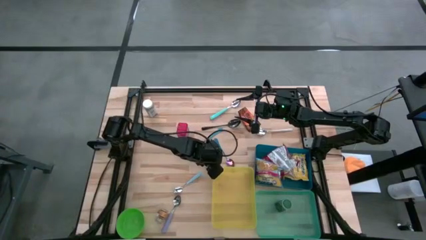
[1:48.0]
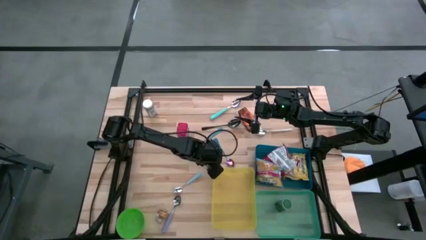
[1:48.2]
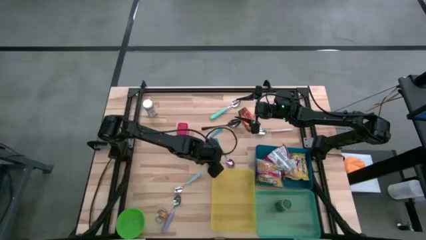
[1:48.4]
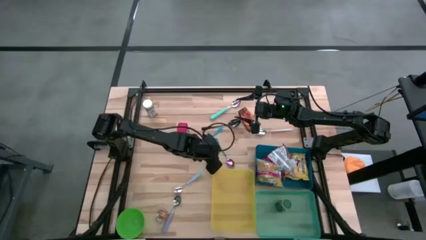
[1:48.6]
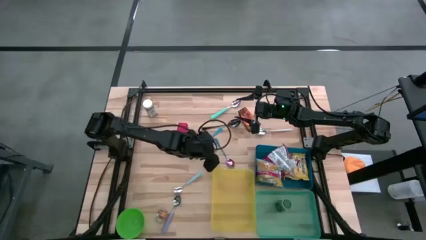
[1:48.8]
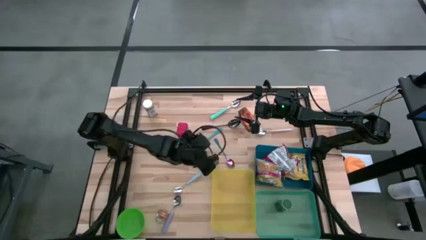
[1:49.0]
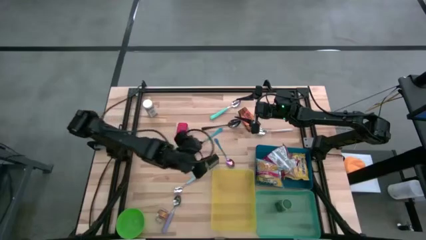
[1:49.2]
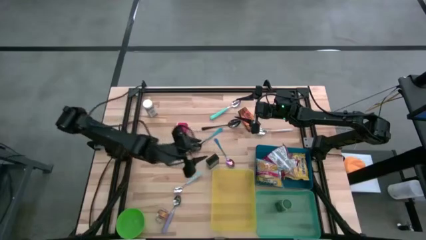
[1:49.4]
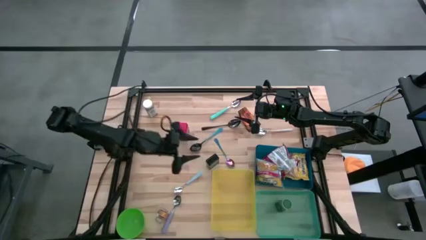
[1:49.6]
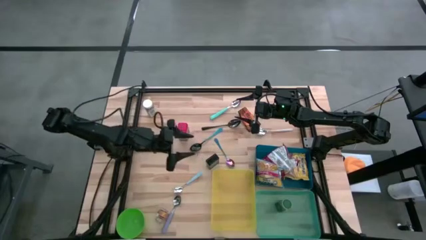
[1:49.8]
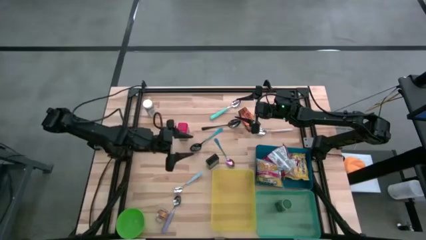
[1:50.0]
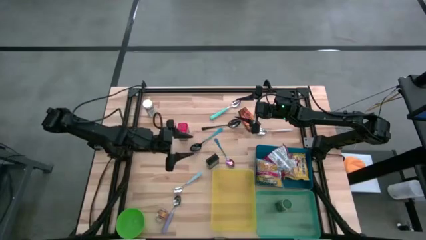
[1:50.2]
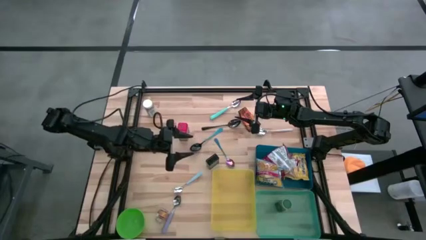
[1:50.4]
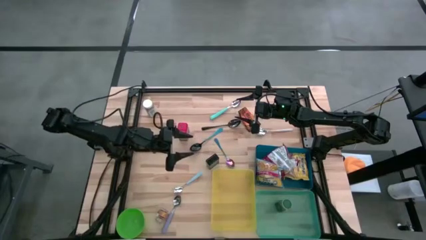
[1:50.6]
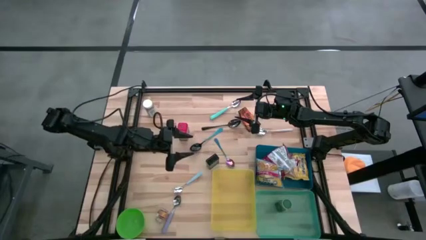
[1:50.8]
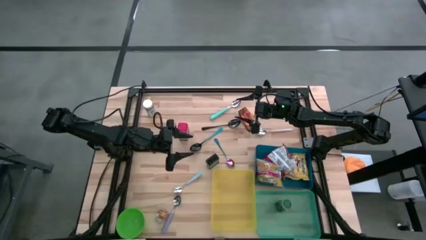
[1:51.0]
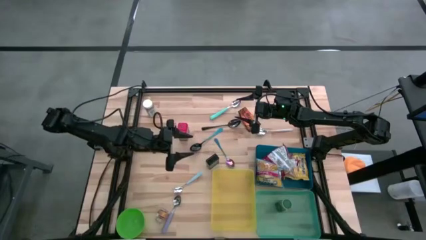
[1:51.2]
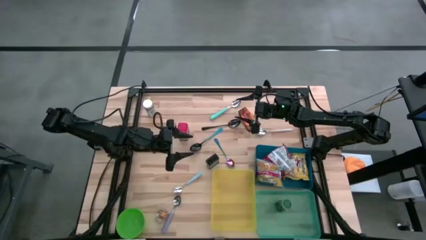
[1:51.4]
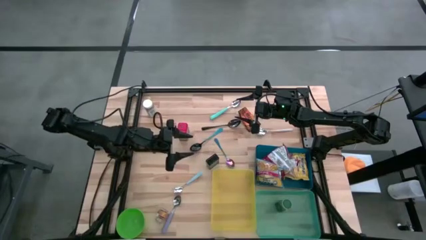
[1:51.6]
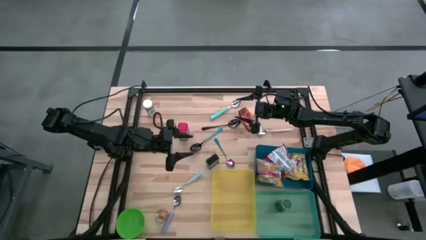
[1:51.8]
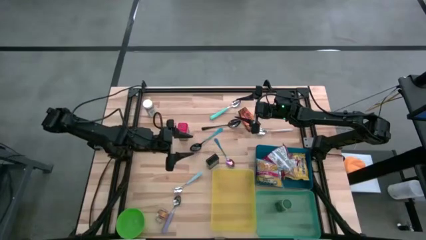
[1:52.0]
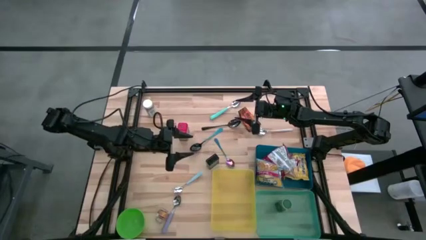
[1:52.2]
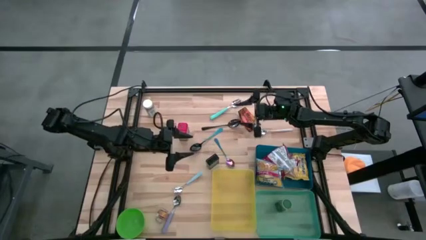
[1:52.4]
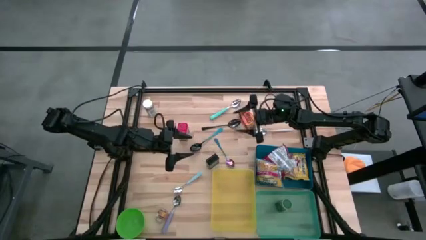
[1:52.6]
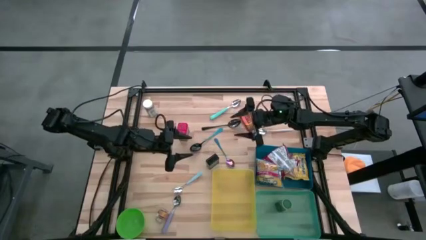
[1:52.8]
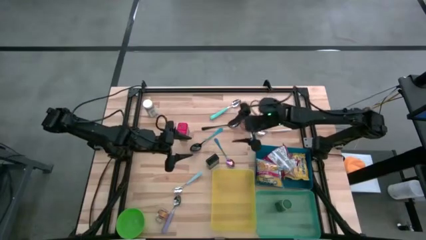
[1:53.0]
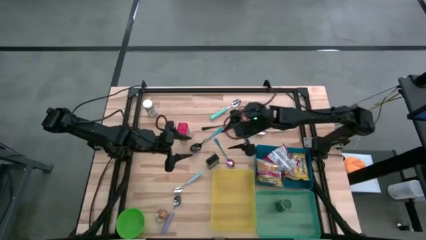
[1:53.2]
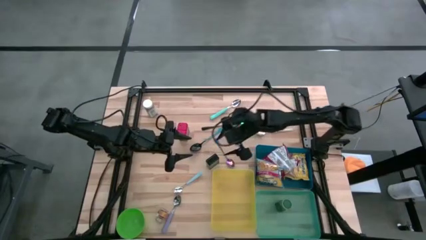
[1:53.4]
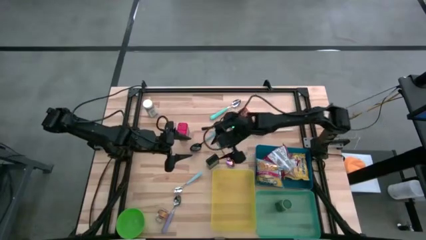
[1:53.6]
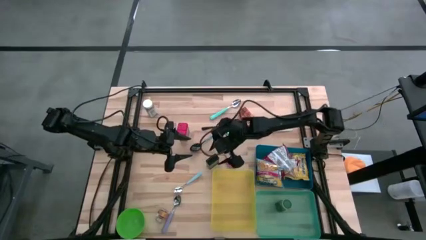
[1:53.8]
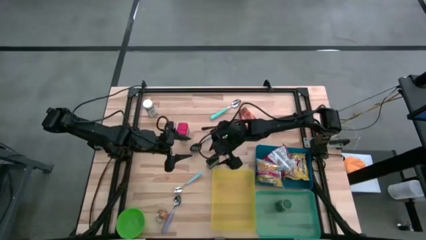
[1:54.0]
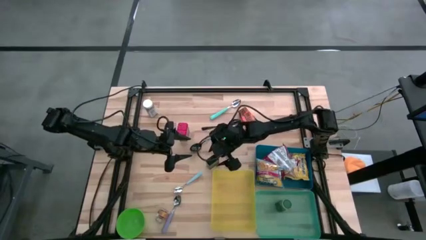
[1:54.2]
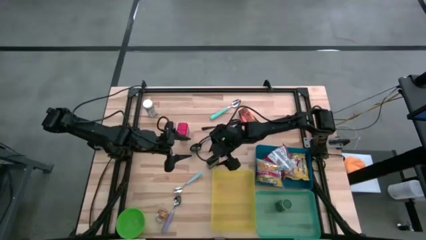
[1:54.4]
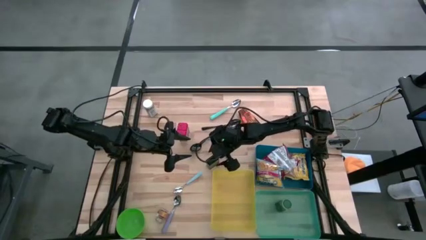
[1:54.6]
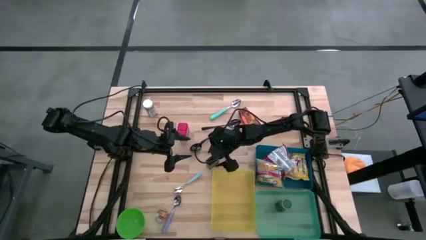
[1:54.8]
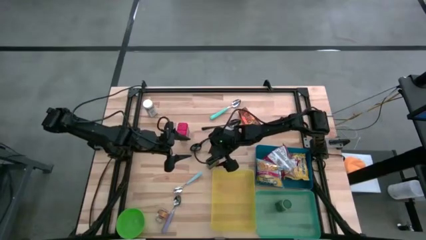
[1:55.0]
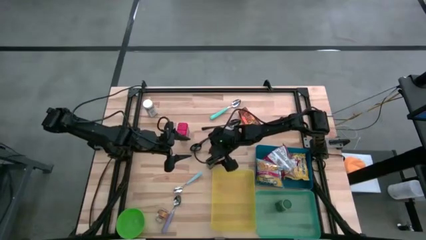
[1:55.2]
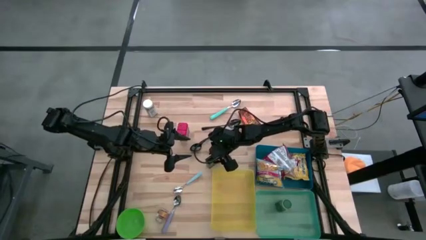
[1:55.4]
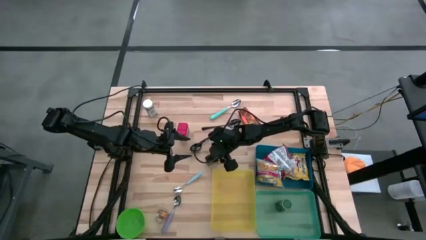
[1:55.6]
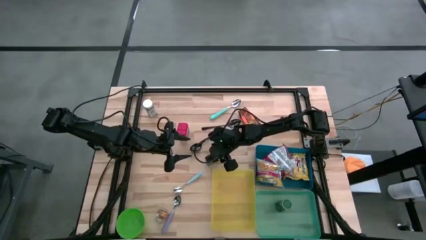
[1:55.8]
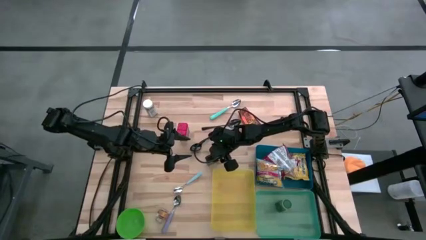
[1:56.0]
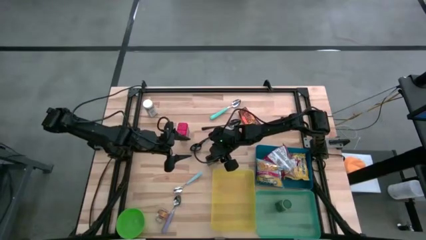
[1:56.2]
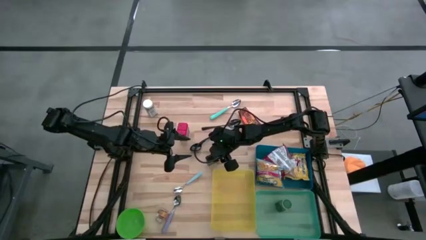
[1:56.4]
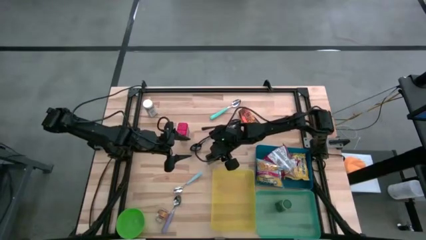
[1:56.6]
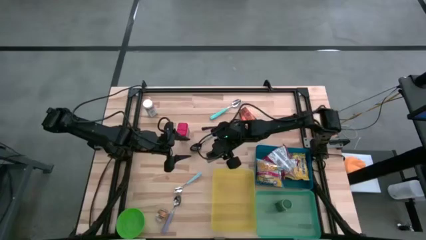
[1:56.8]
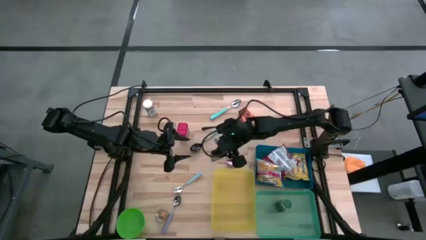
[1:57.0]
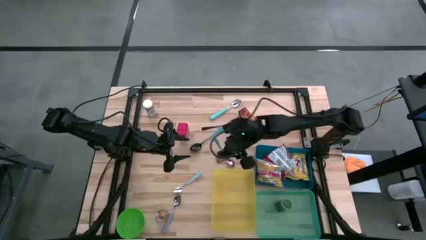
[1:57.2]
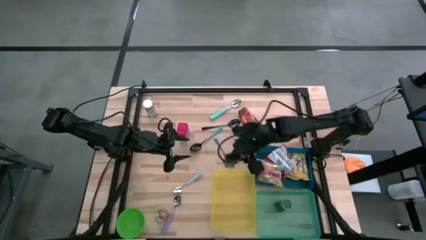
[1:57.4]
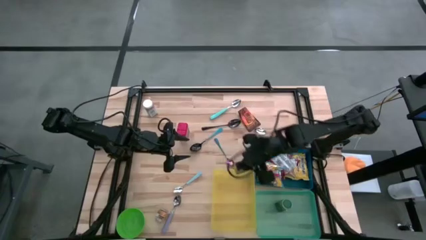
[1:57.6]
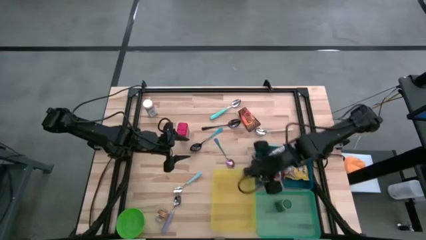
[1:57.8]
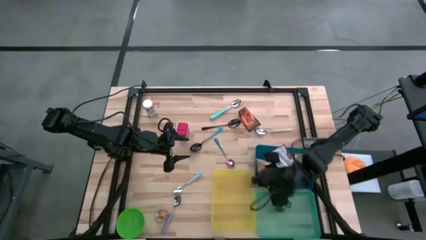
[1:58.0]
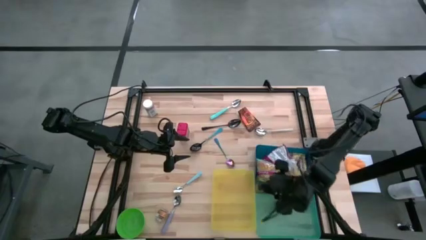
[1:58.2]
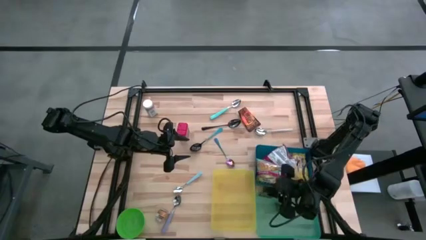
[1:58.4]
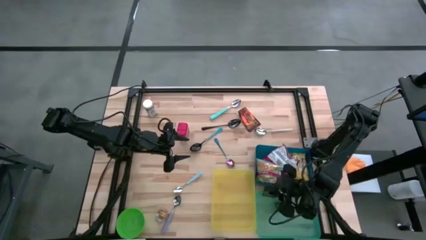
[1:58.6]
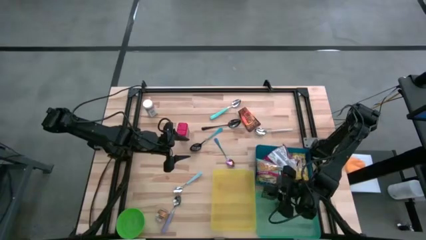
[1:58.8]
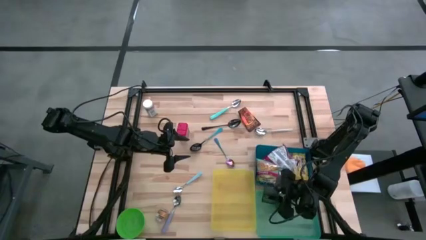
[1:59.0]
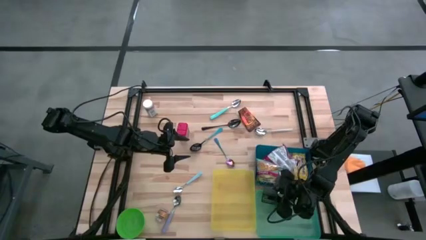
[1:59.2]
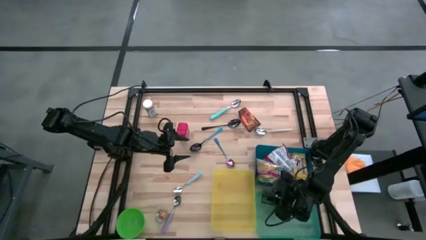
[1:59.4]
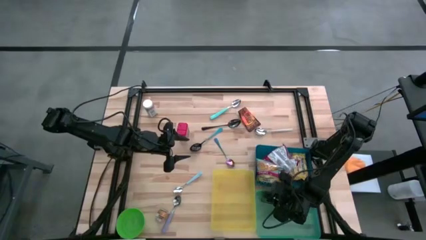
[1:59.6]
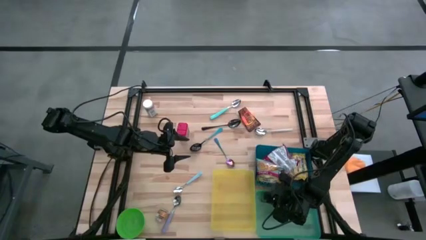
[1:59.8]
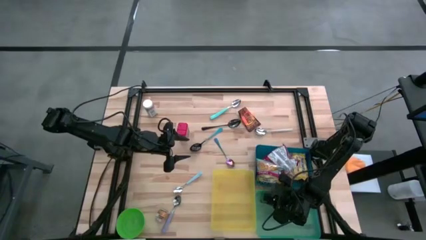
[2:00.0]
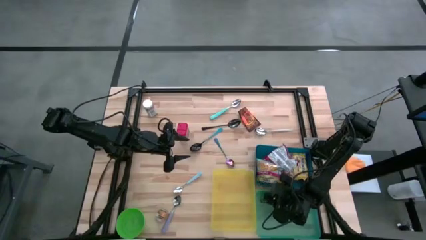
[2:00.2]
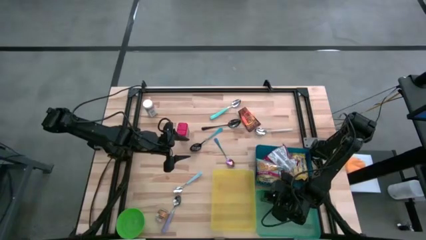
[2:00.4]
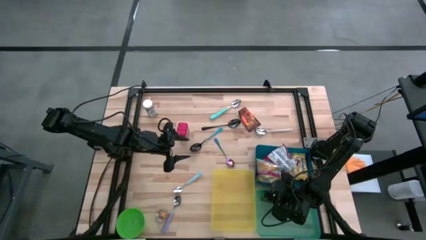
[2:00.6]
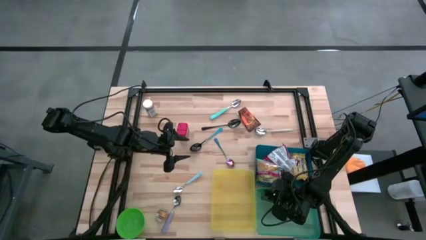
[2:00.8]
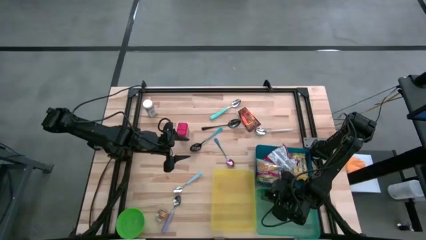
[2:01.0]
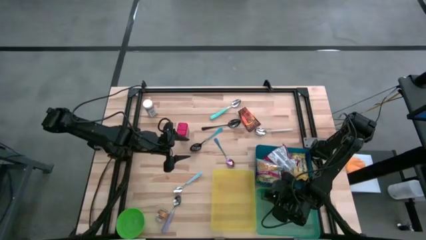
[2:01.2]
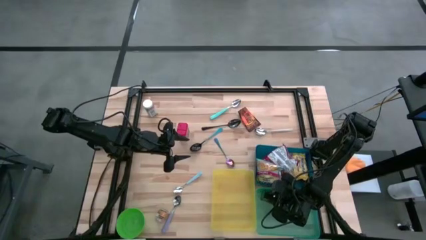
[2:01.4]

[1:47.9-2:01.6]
Put the black seasoning can into the green bin

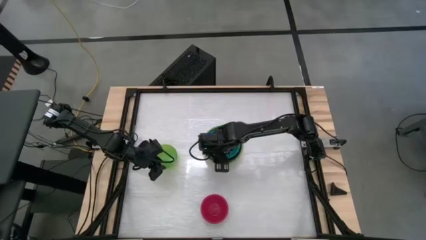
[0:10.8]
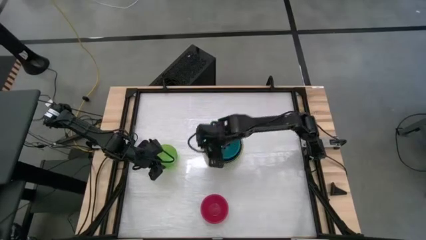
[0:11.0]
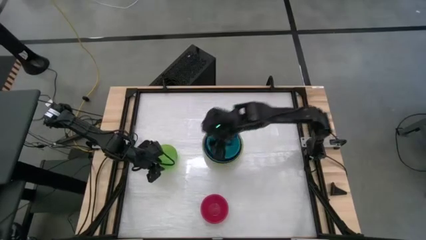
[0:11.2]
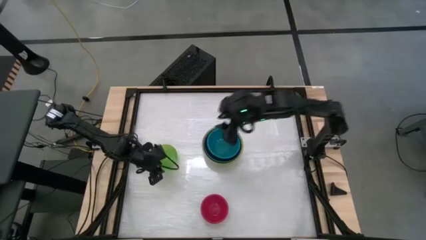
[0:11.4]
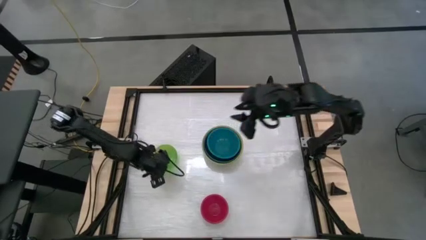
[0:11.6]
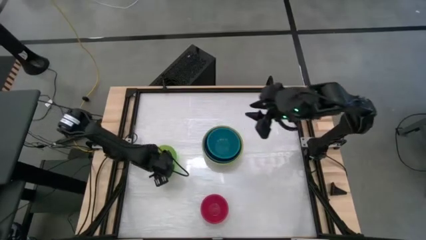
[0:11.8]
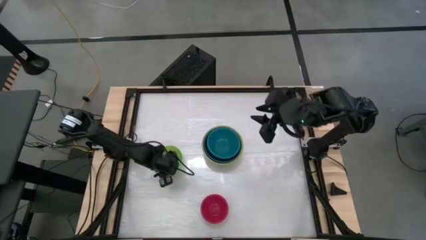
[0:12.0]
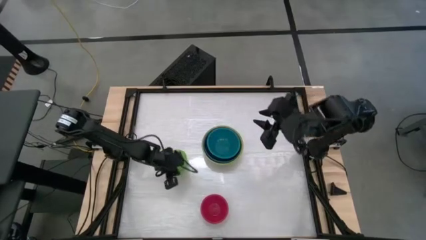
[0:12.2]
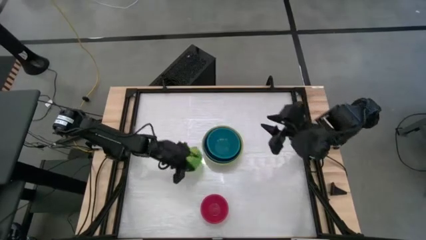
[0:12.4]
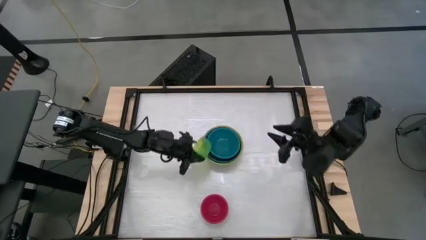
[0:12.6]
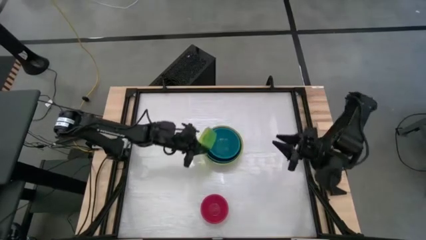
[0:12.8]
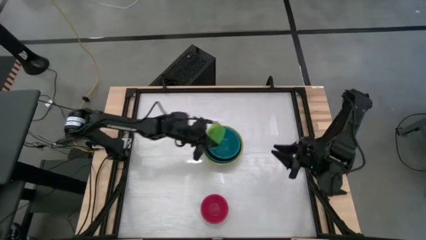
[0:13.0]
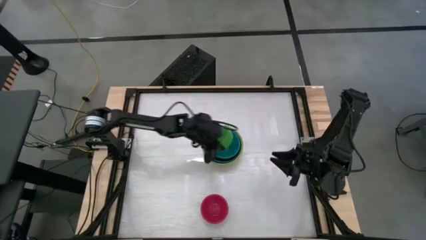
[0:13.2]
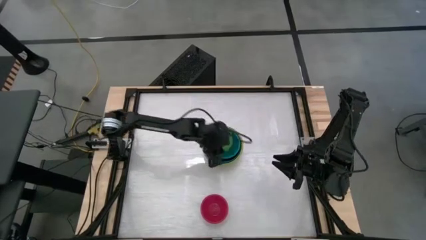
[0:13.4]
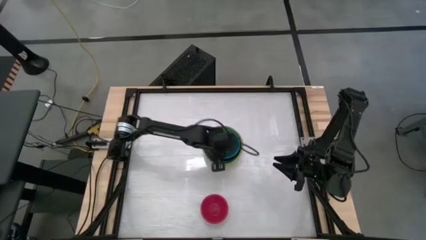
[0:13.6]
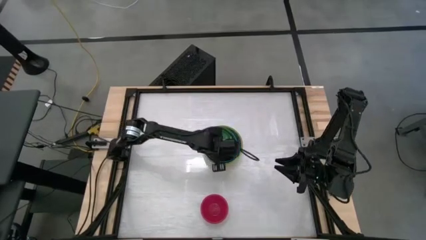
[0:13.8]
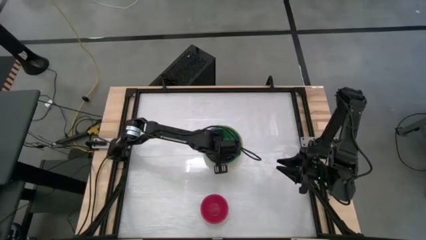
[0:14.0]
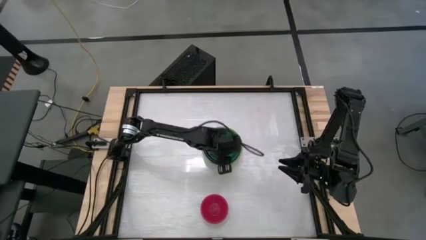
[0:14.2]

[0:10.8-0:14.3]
Stack the green transparent bowl on the blue bowl
